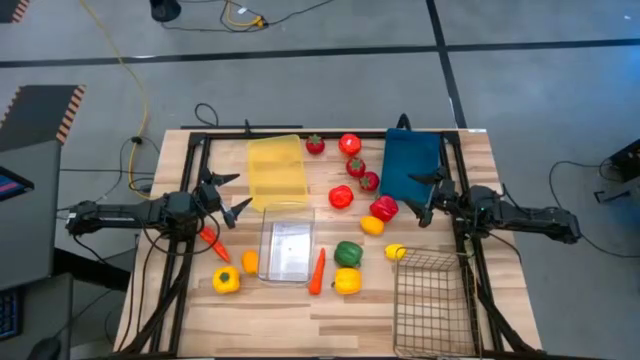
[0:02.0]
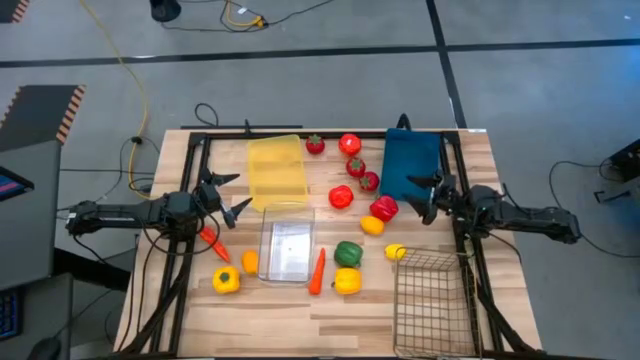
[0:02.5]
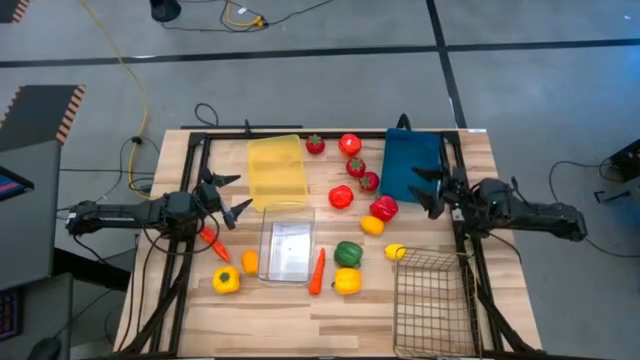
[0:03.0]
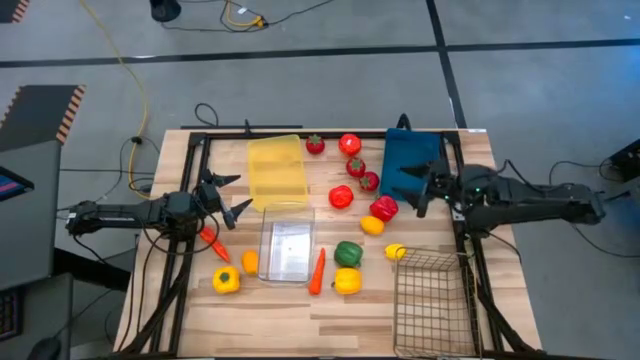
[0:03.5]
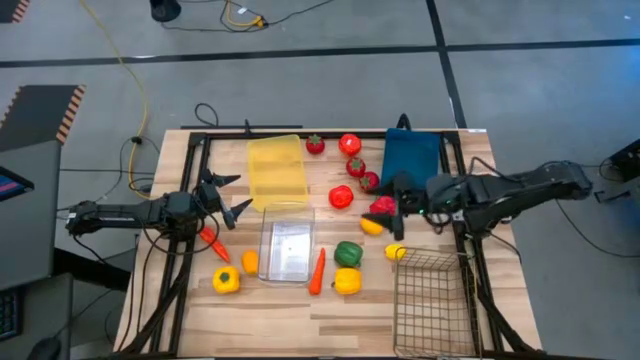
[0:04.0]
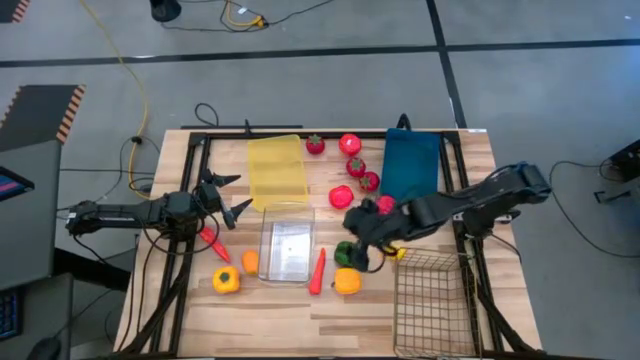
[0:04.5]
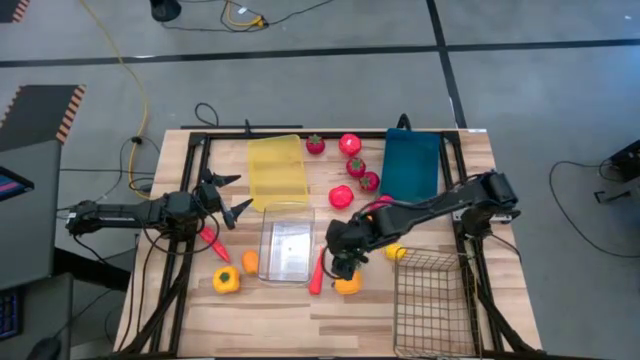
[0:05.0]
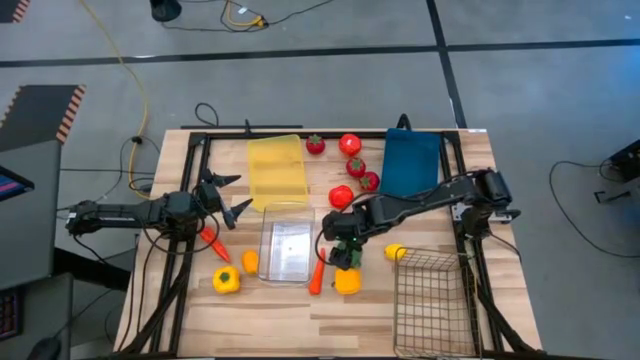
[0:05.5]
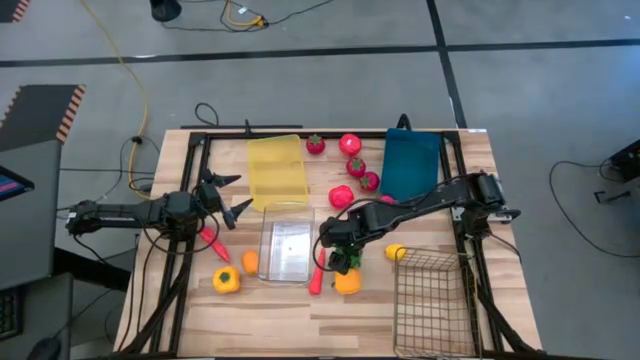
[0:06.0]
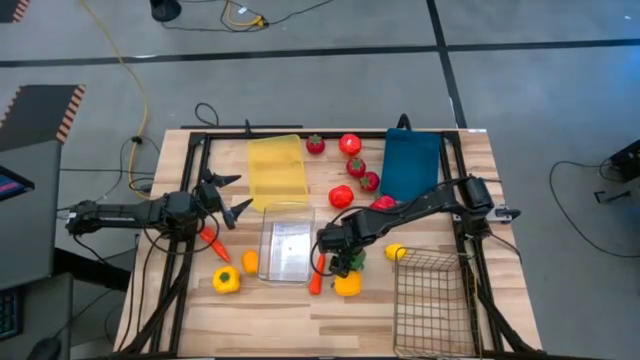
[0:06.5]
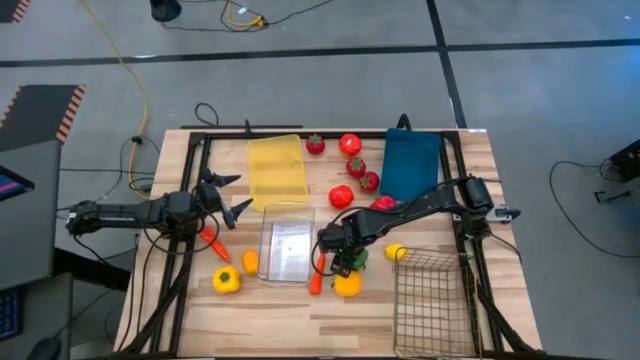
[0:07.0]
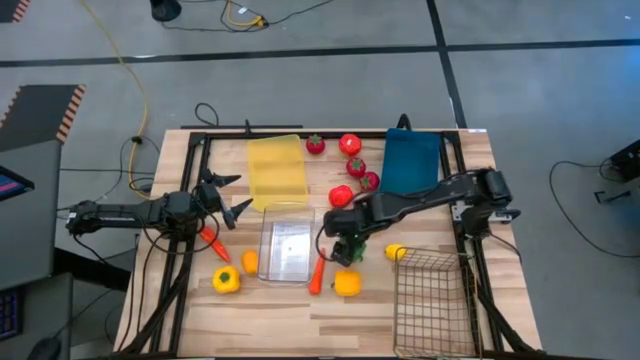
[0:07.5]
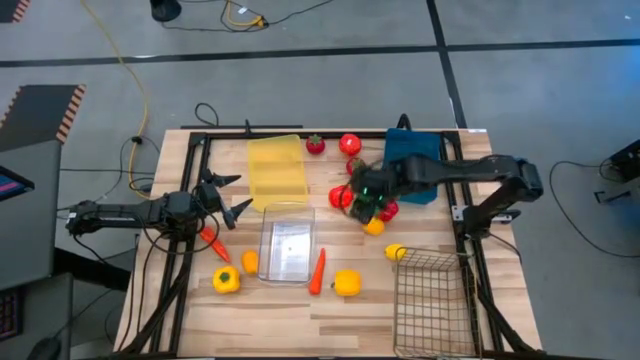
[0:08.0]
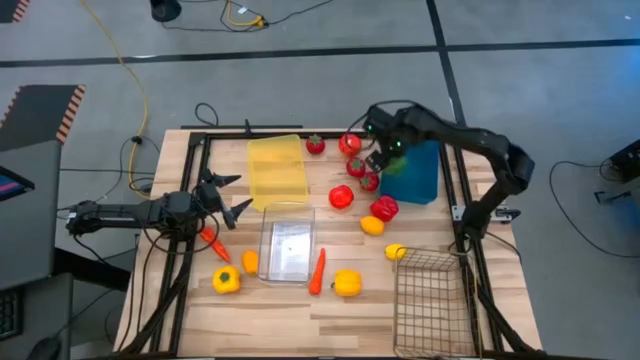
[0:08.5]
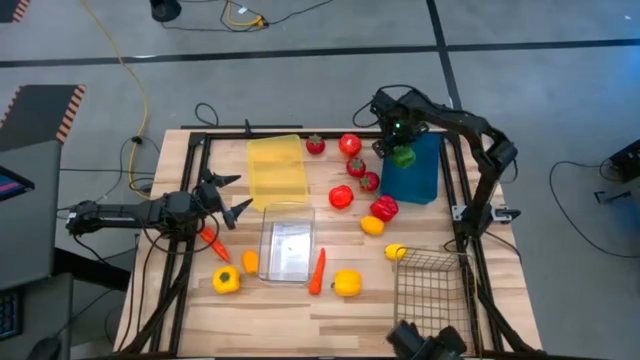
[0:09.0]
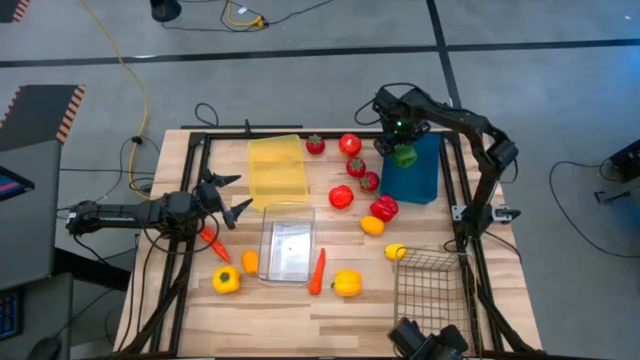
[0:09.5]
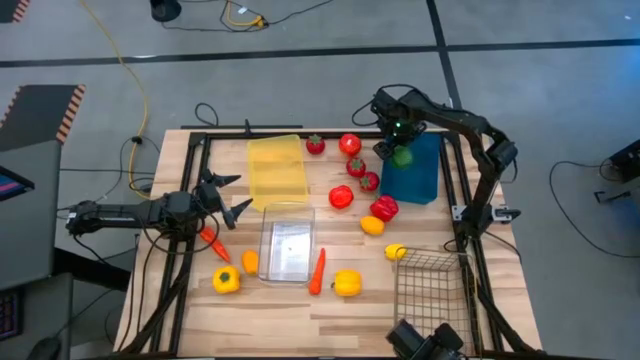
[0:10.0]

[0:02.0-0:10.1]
Task: Sort produce into baskets
Put the green bell pepper into the blue bin

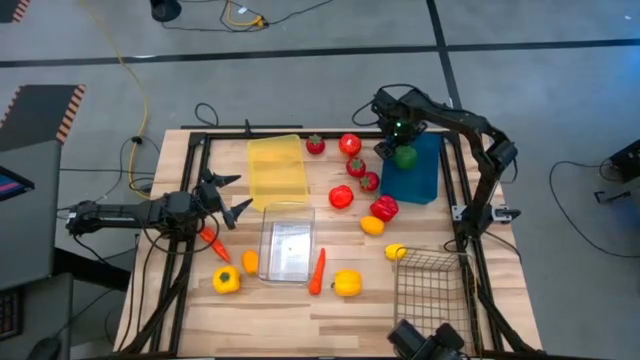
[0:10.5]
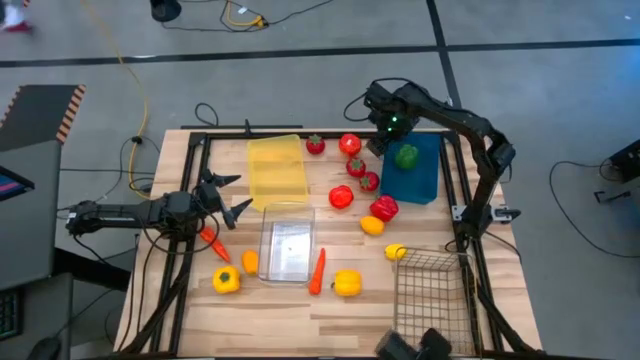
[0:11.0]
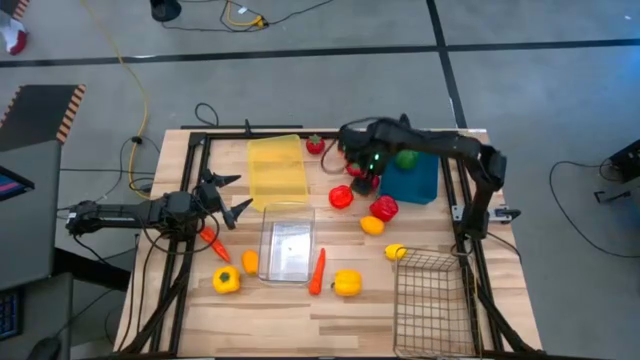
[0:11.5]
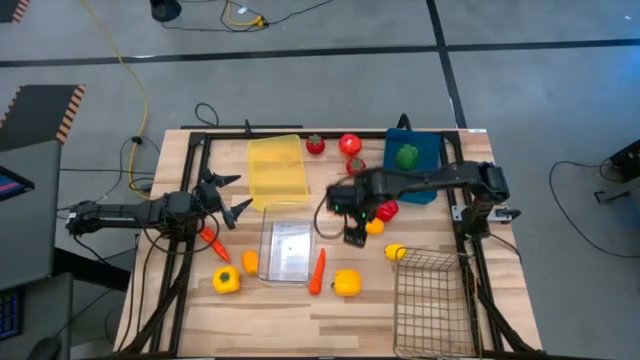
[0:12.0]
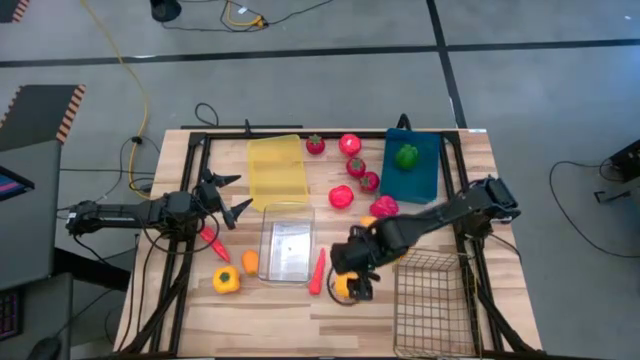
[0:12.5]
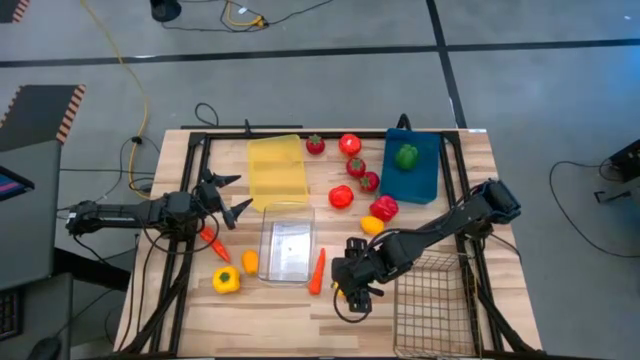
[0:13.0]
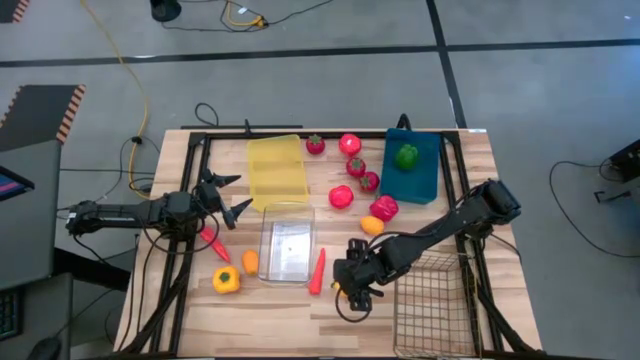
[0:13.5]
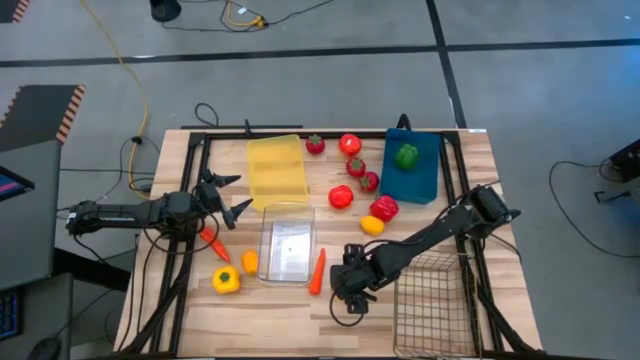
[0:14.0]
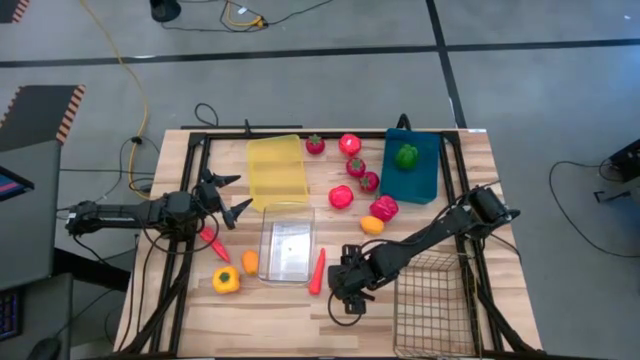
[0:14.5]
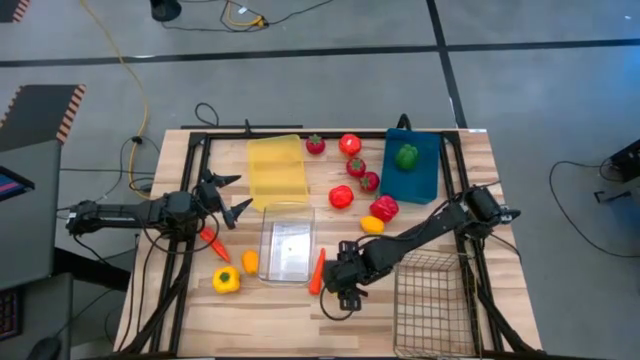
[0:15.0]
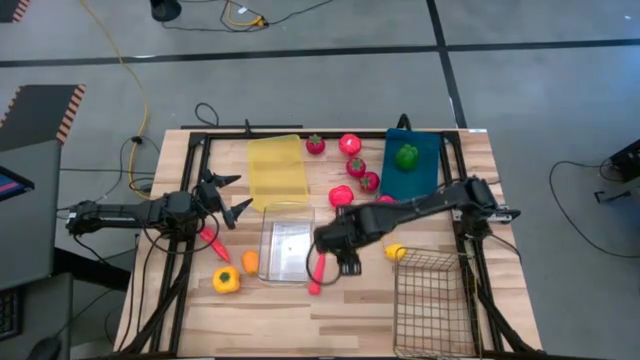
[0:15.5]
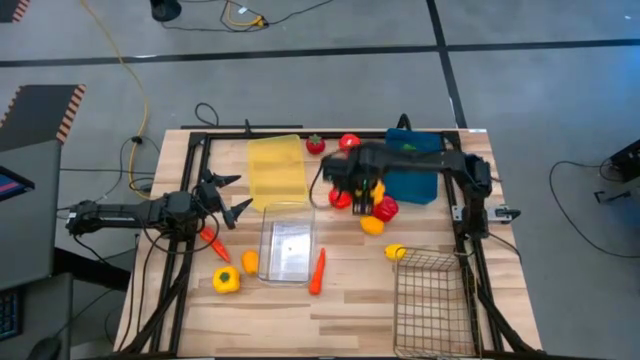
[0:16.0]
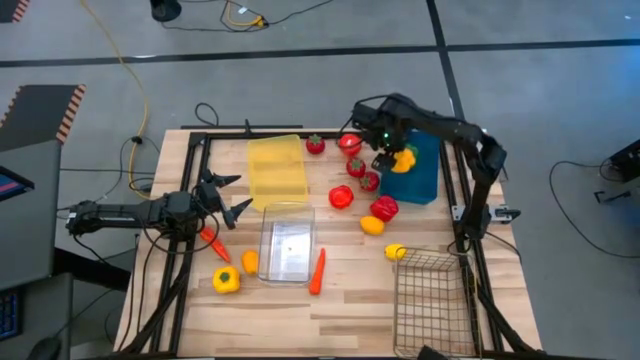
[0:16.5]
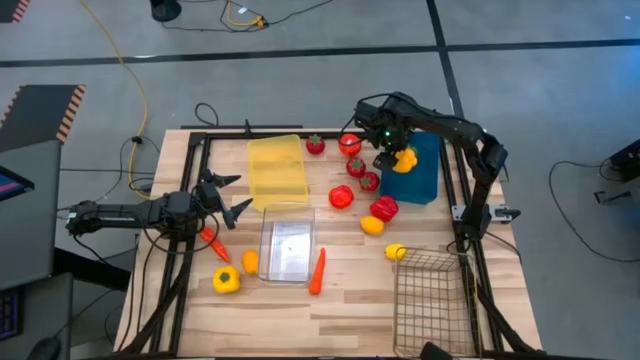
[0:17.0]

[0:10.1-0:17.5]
Put the right yellow bell pepper into the blue bin

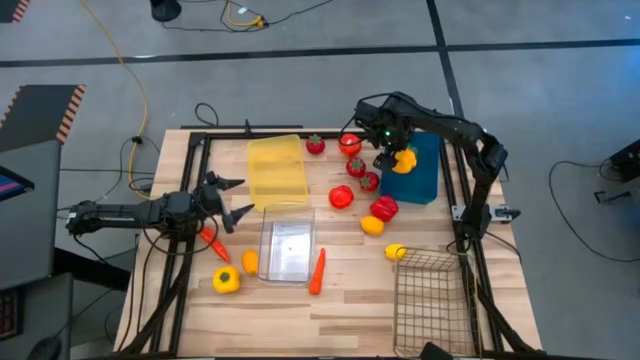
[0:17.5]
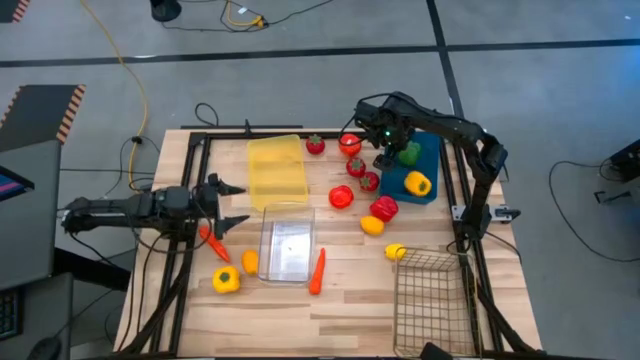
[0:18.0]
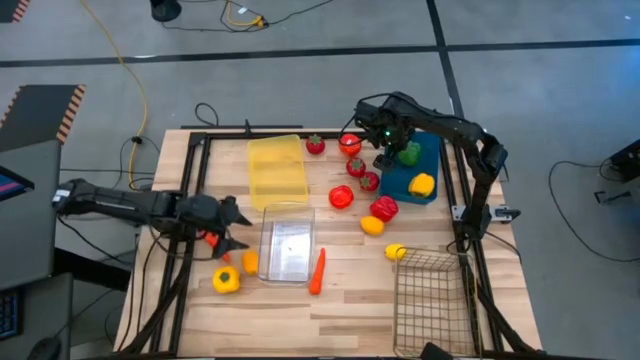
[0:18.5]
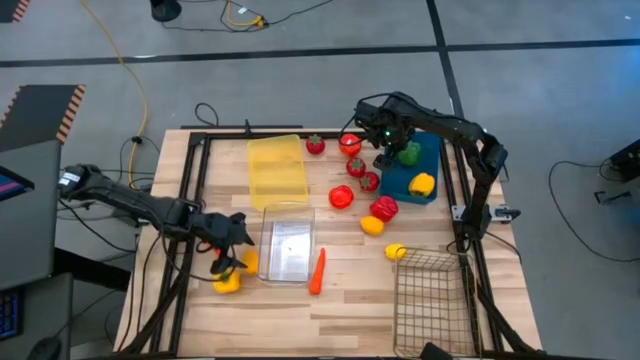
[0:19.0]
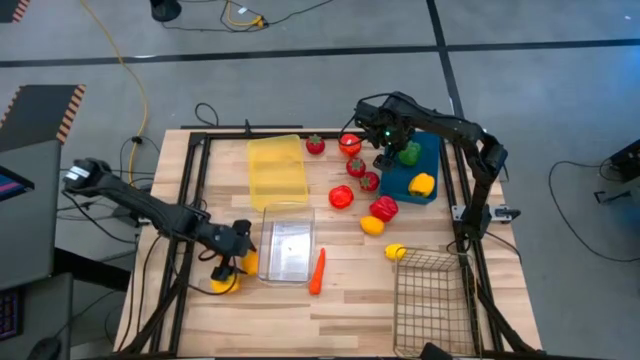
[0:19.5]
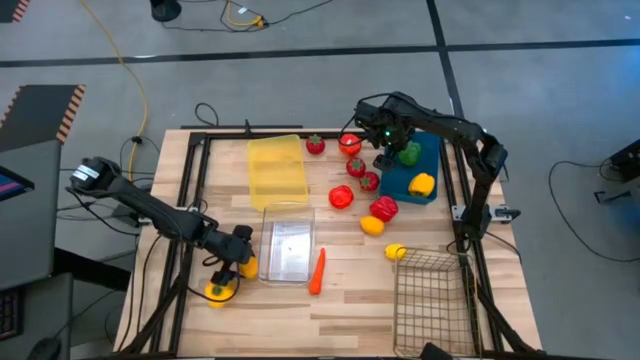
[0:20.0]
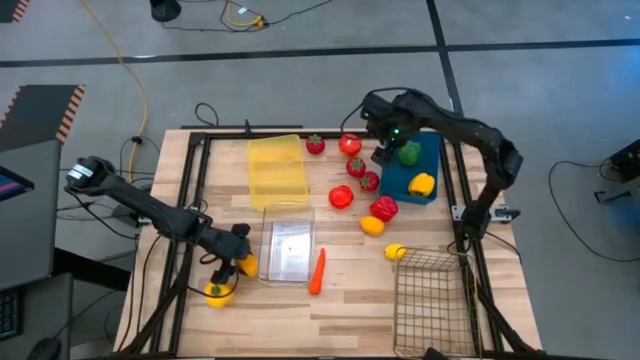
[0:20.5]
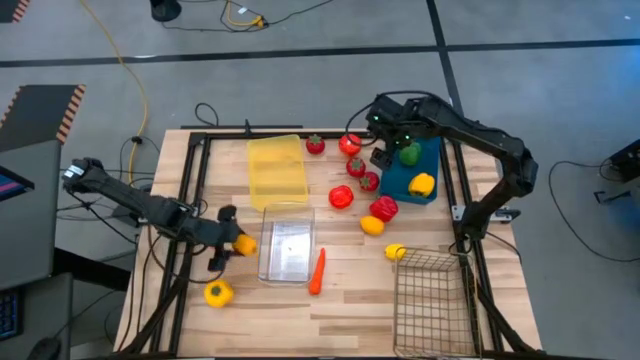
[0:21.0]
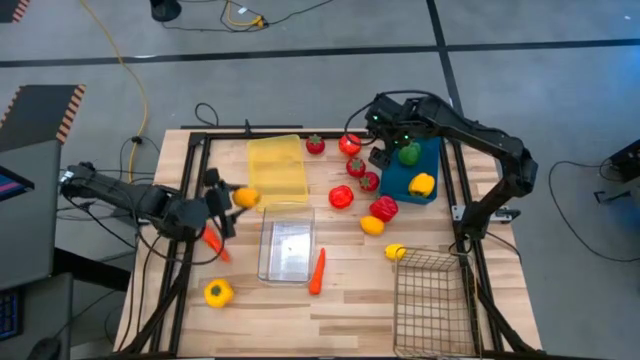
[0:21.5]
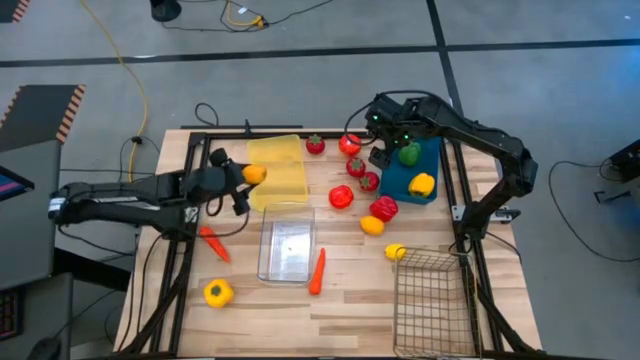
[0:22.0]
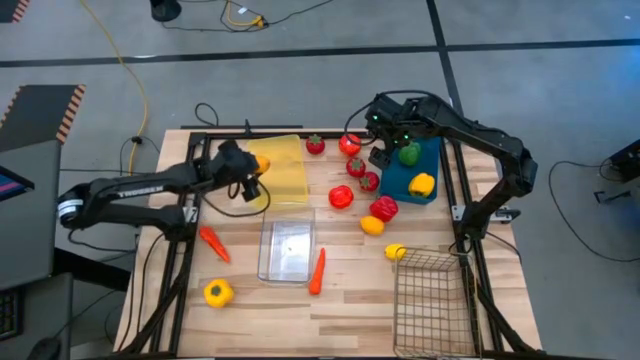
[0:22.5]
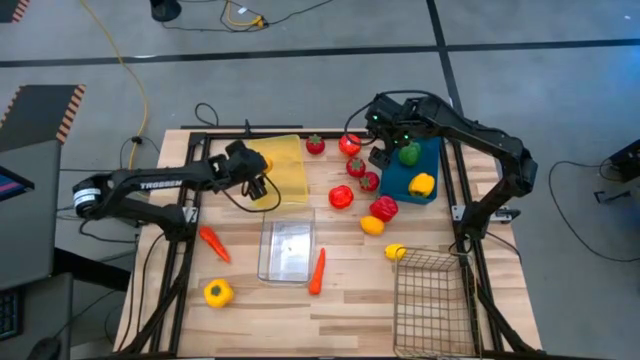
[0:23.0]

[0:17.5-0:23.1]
Put the bottom left lemon into the yellow bin

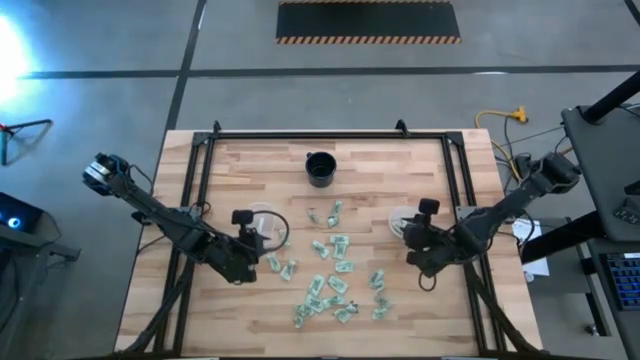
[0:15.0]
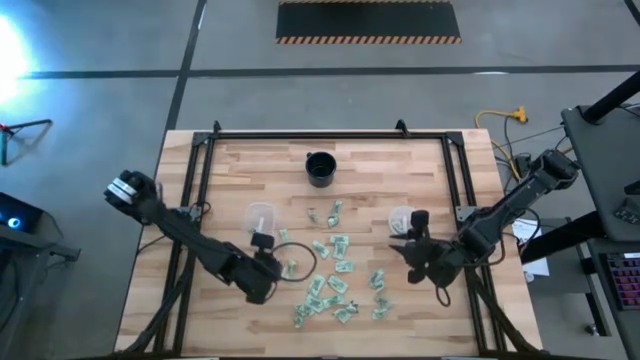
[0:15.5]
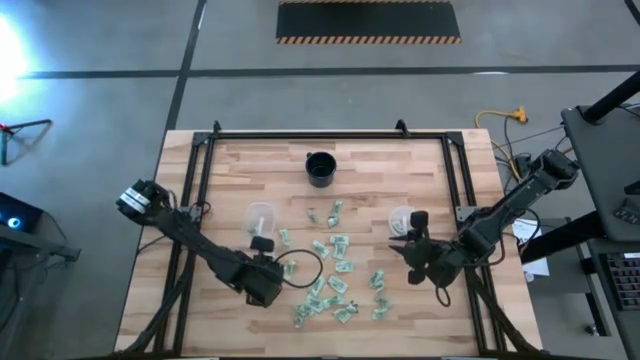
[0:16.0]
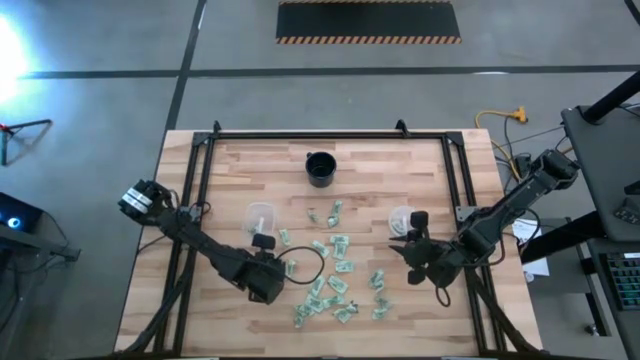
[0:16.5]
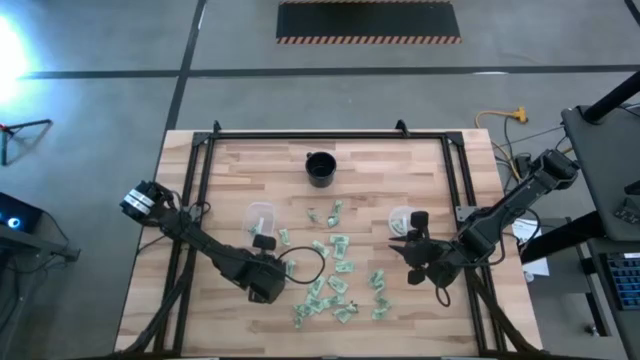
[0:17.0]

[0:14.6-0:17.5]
Task: Pick and place Stevia / Truvia into bins
Put the light green stevia packet into the rectangular container
